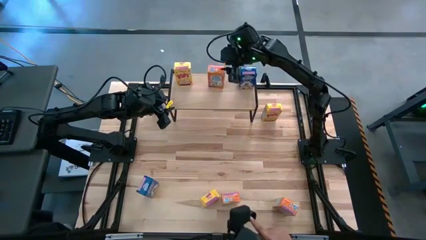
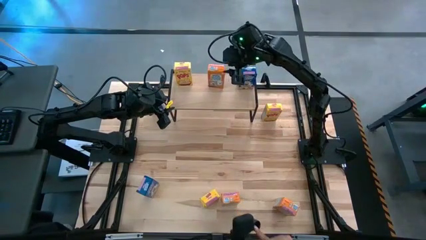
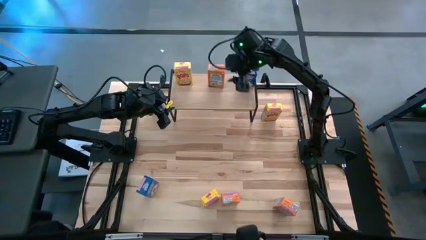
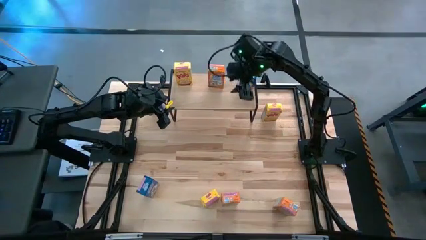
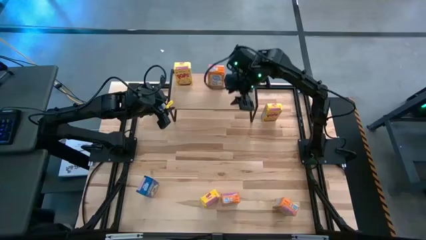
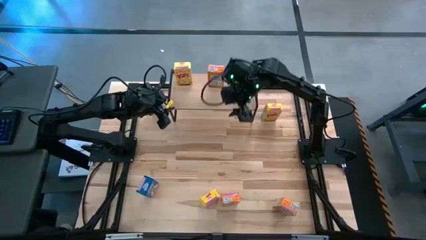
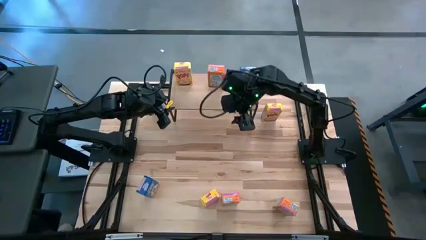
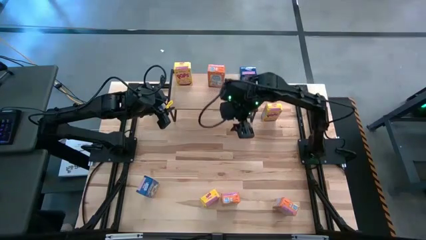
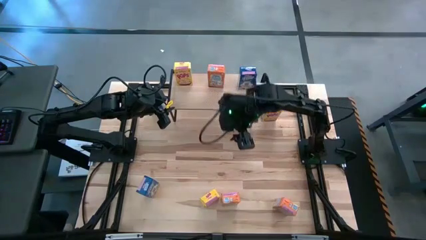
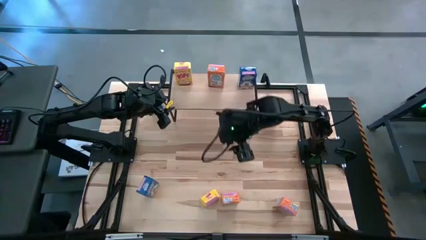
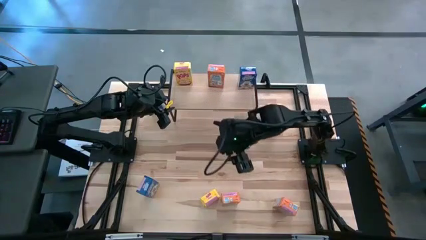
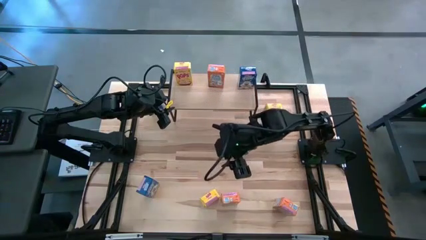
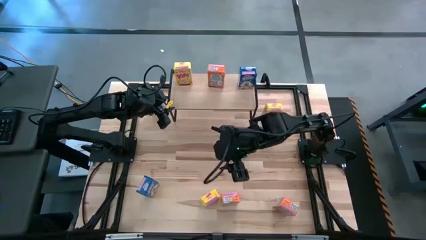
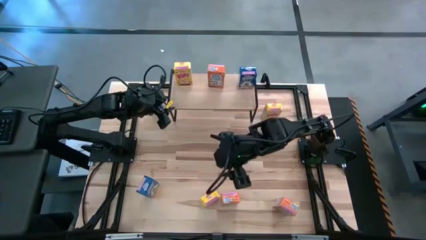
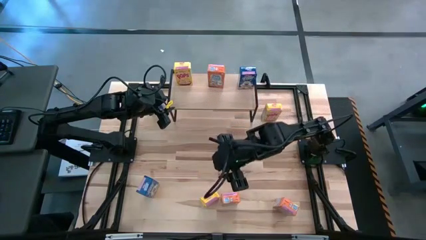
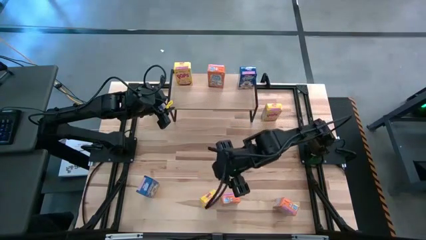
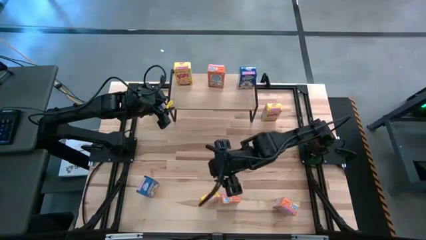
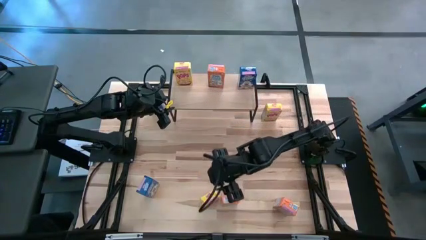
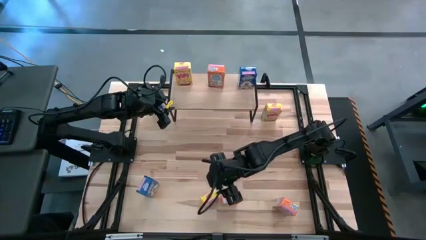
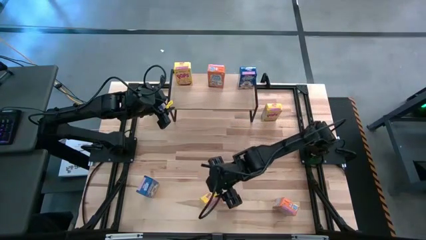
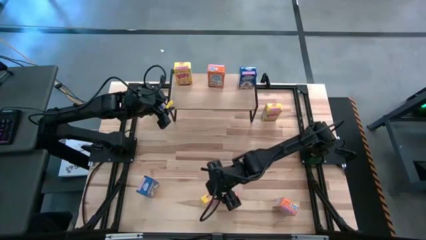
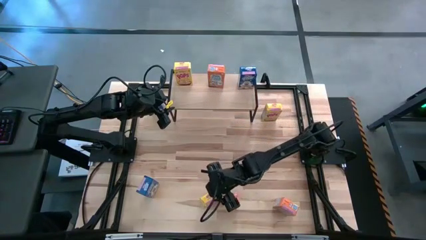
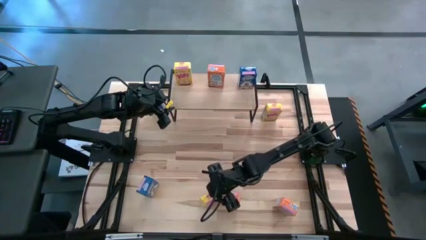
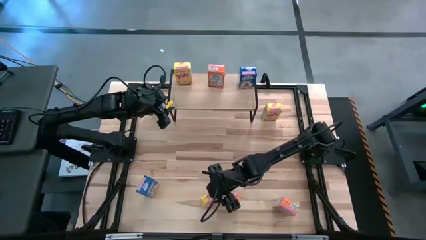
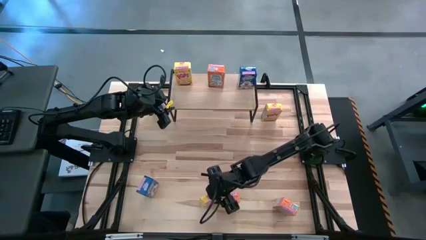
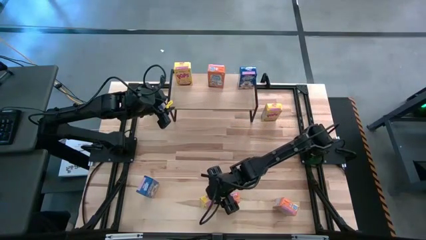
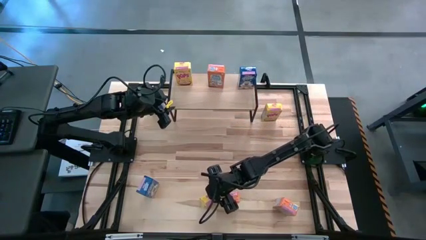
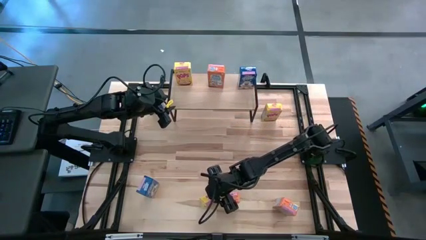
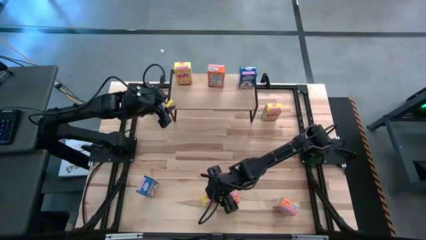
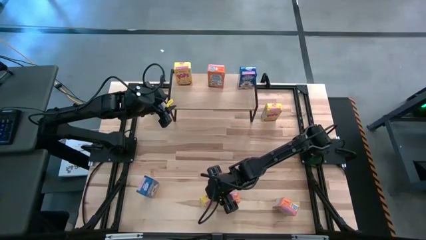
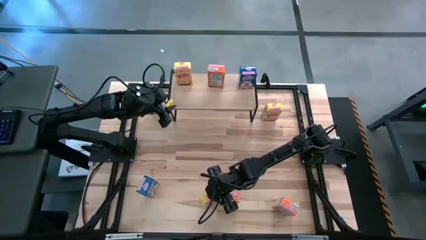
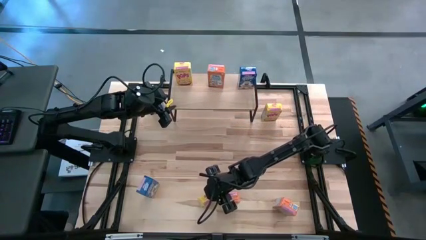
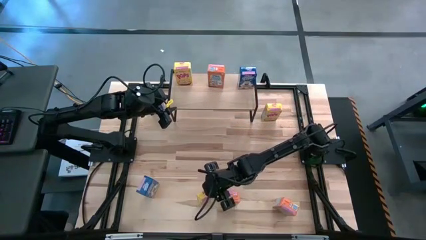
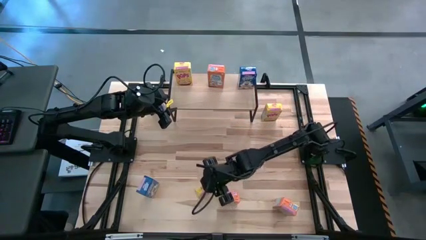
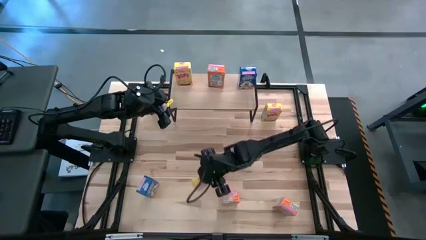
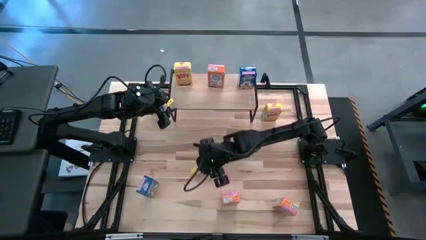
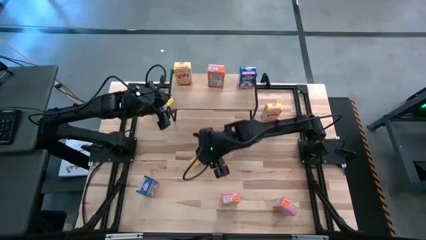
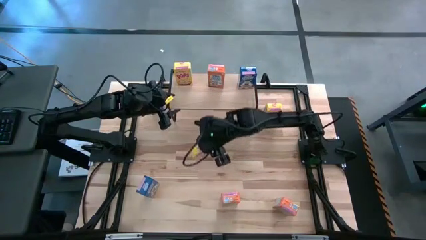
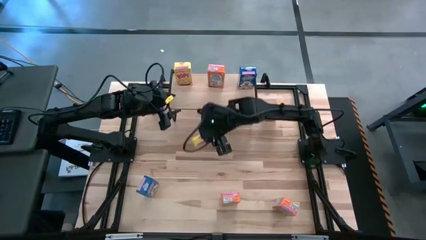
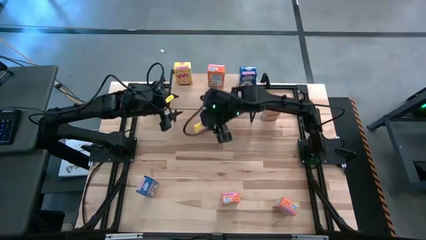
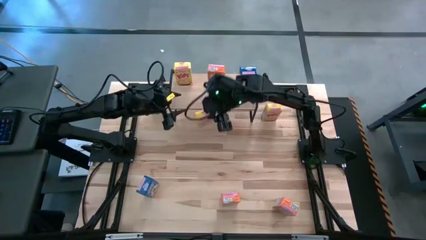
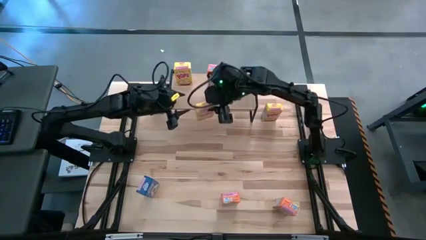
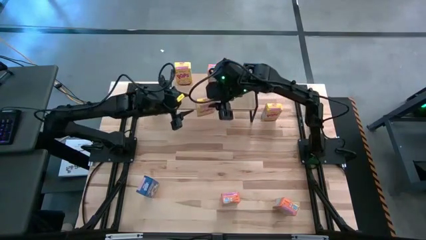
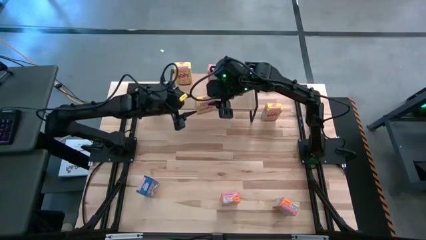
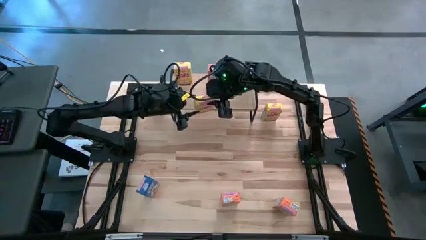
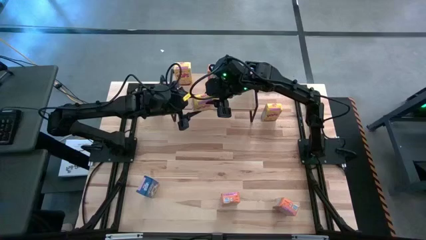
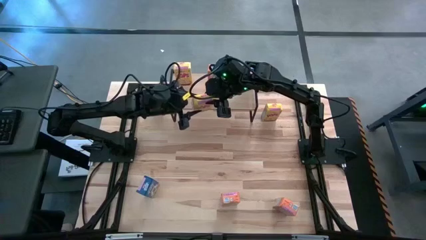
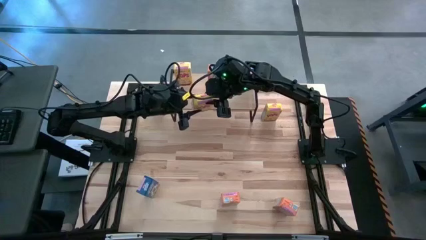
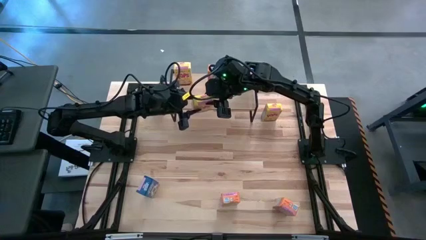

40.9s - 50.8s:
Task: Stack cereal on shelf
Put the bottom yellow cereal box on the shelf aligned with the other yellow cereal box
